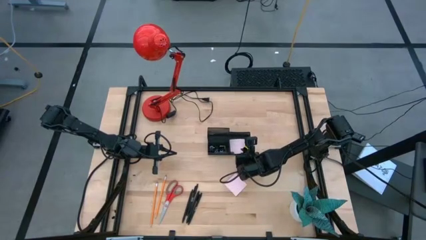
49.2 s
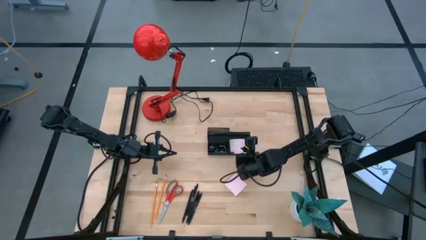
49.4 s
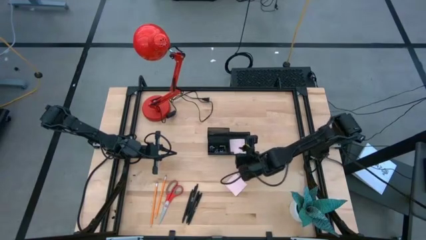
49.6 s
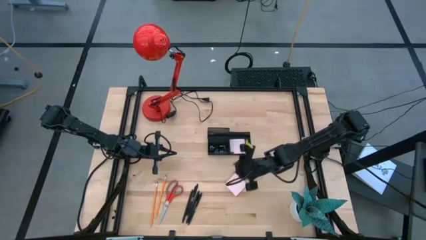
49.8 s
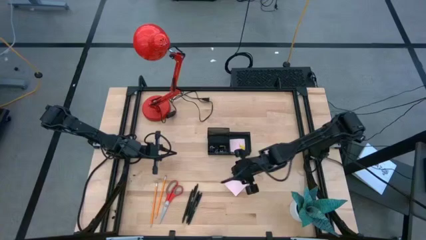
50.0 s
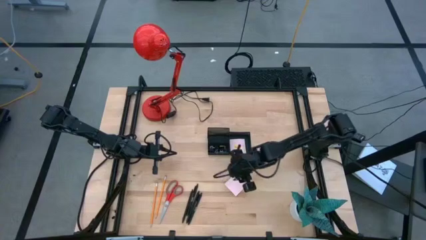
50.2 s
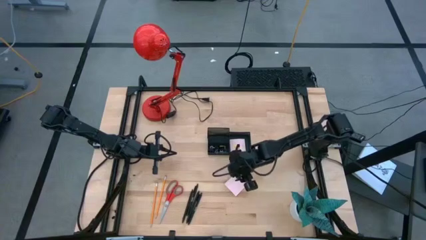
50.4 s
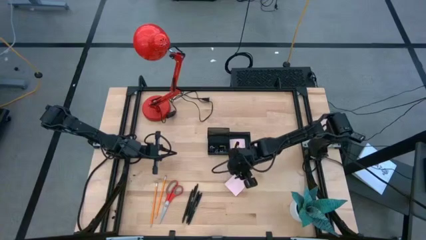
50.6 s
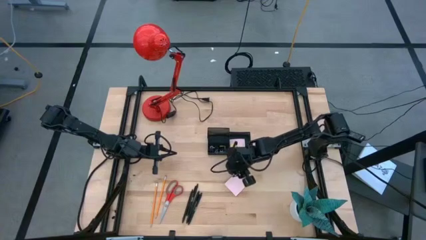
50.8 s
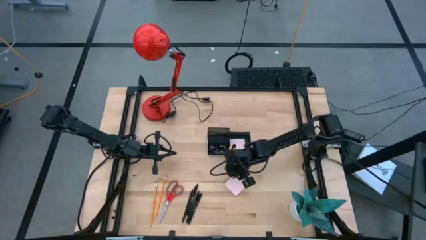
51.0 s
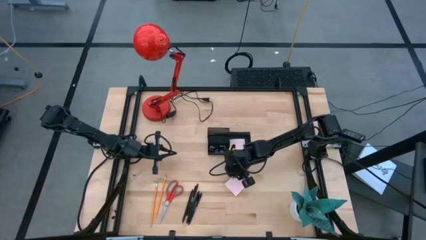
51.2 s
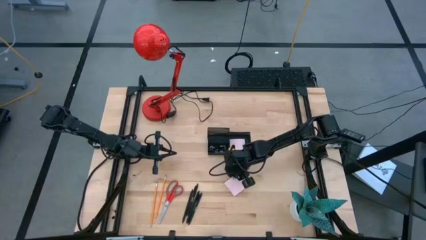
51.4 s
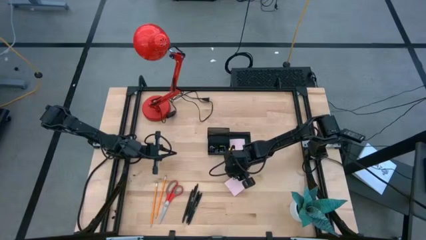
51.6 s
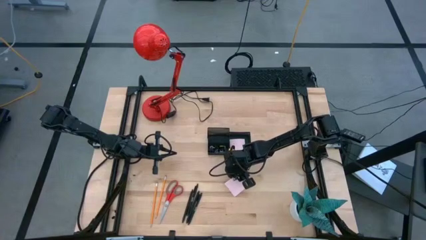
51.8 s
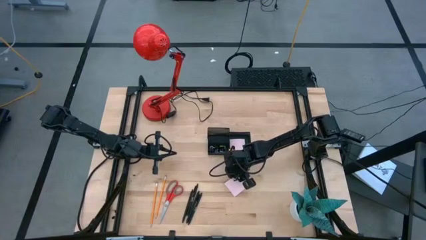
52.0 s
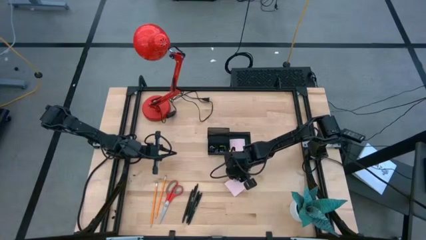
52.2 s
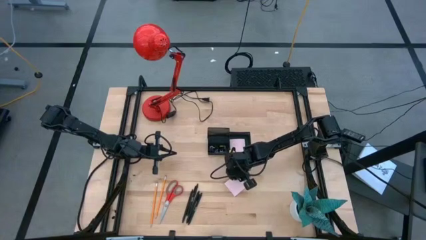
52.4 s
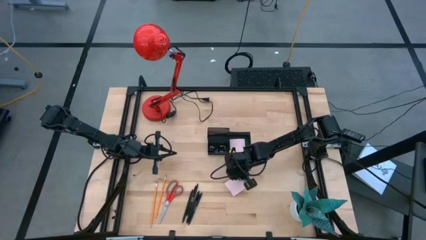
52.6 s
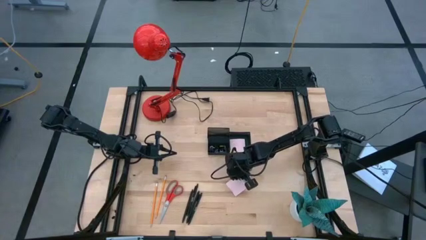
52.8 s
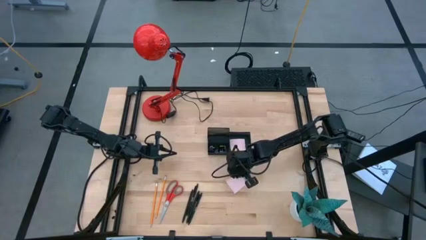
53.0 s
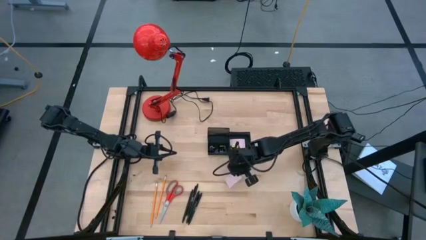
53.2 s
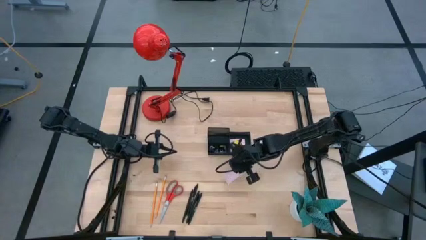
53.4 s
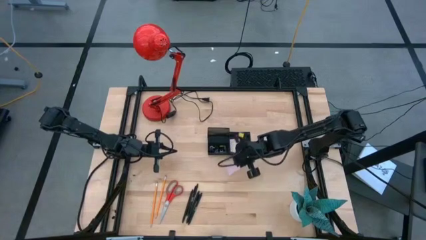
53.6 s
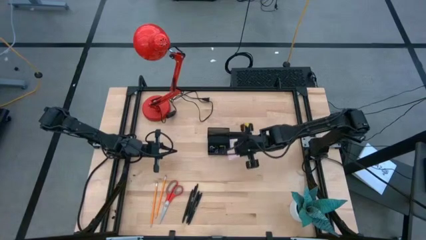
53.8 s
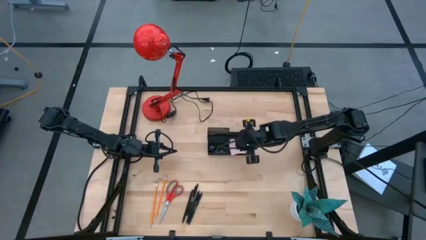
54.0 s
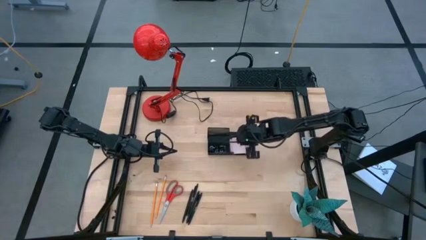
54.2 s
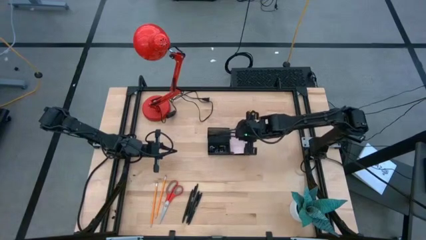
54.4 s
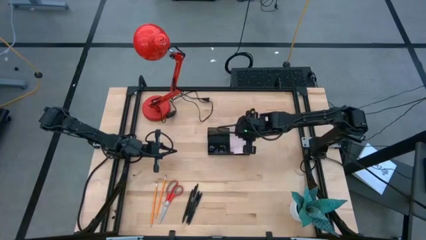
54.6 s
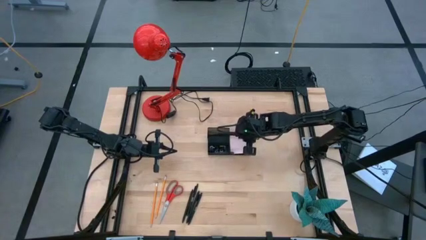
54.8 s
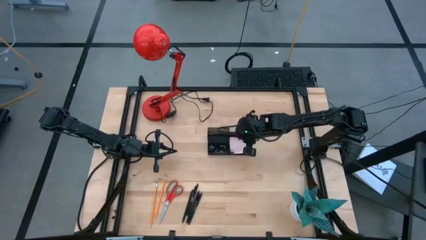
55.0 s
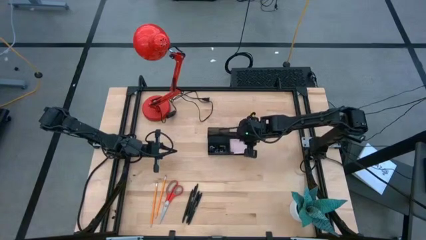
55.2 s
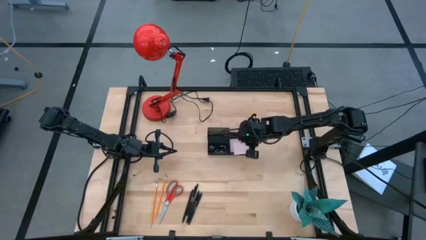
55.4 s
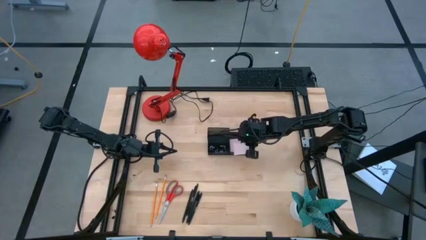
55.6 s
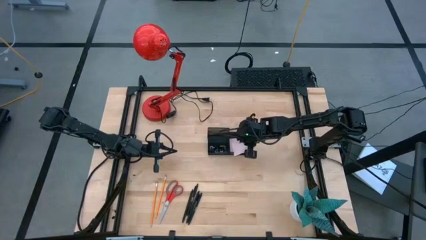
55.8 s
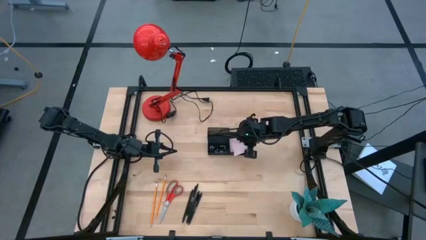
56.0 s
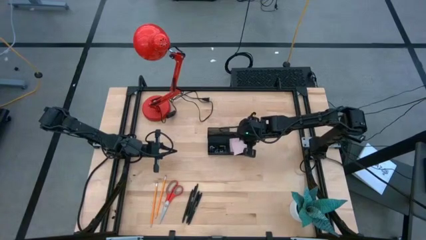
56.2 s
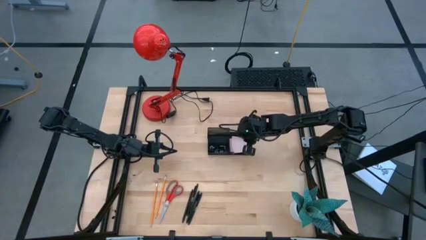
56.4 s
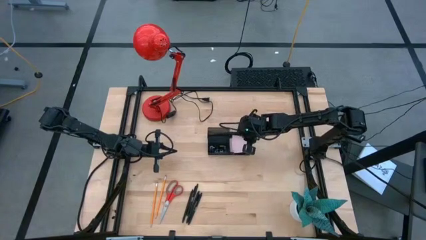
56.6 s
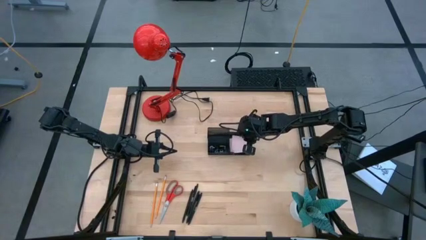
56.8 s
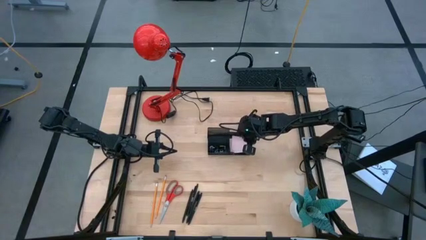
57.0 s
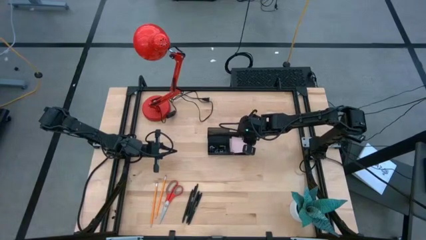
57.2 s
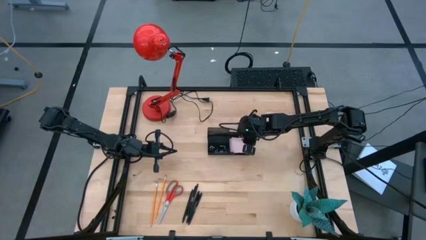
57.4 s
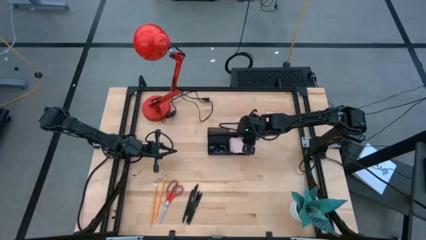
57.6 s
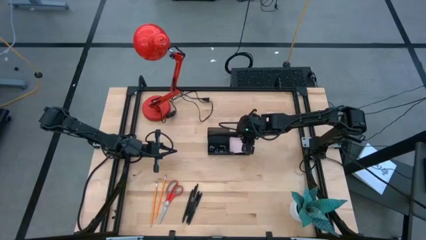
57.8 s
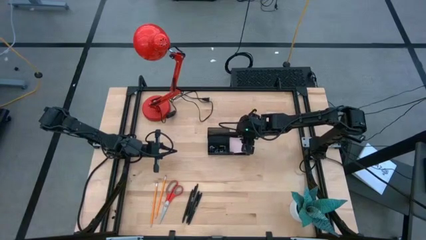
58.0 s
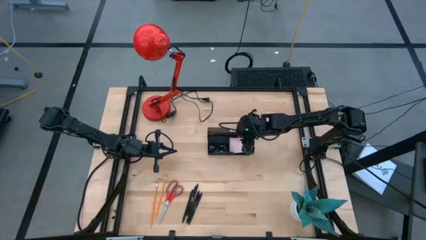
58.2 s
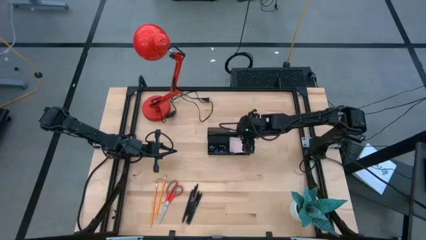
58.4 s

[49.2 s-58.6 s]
Task: Pick and place office supplies into organizer
Put the pink sticky notes into the black desk organizer

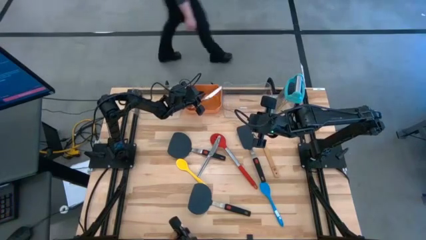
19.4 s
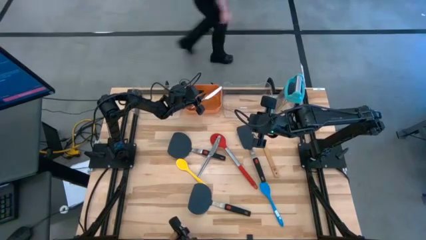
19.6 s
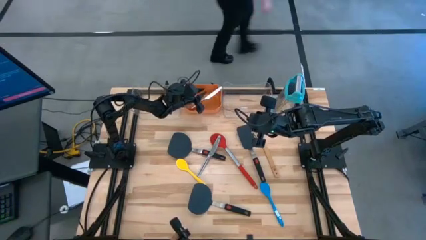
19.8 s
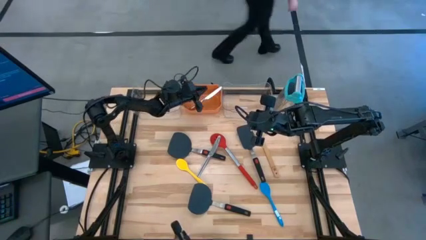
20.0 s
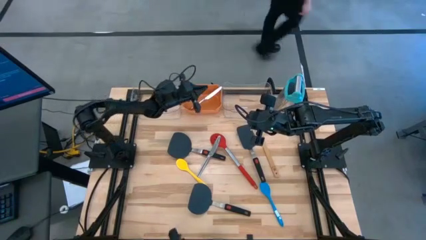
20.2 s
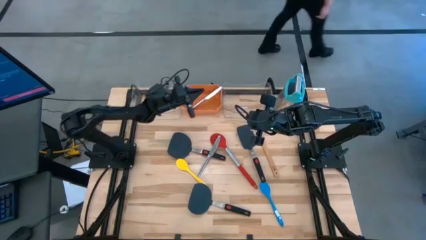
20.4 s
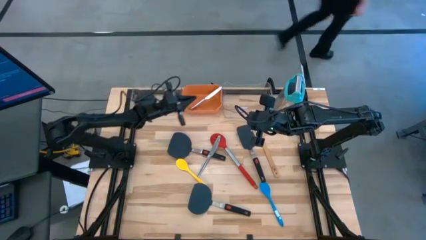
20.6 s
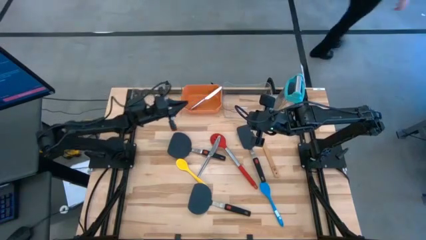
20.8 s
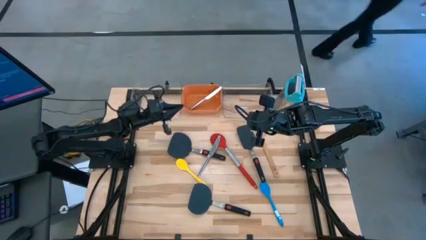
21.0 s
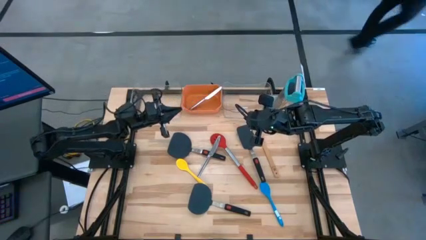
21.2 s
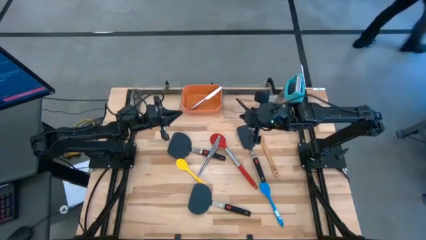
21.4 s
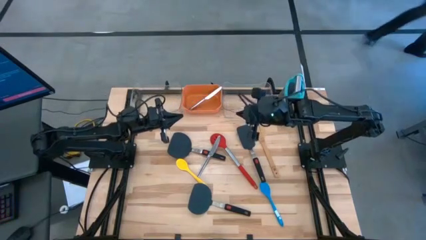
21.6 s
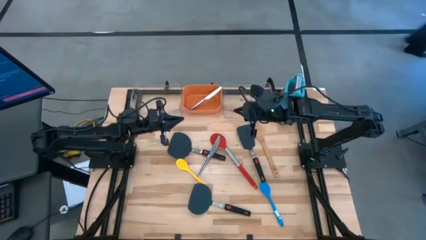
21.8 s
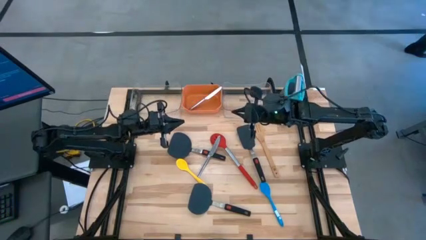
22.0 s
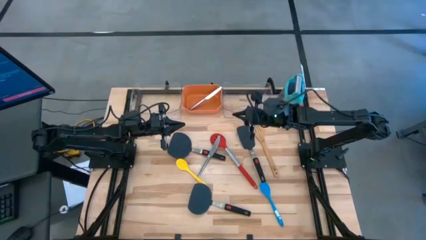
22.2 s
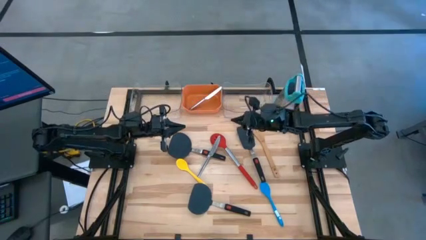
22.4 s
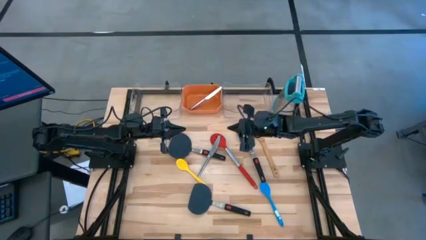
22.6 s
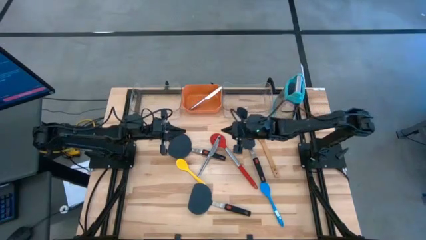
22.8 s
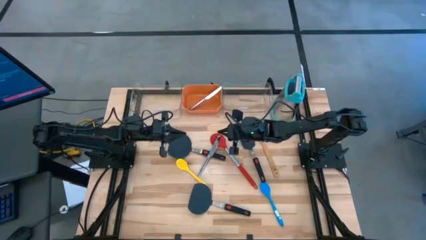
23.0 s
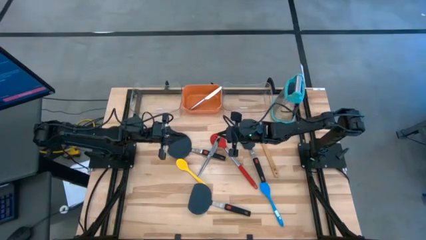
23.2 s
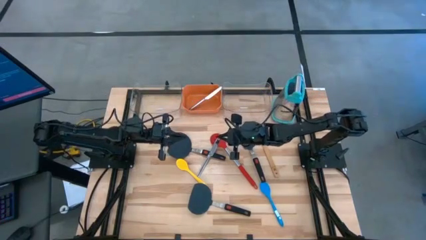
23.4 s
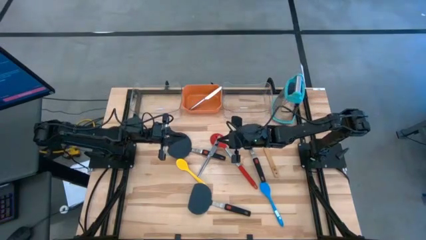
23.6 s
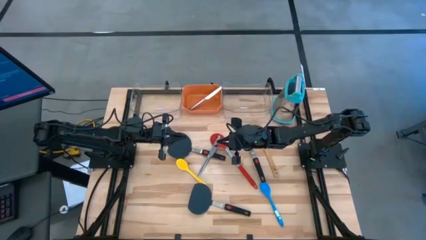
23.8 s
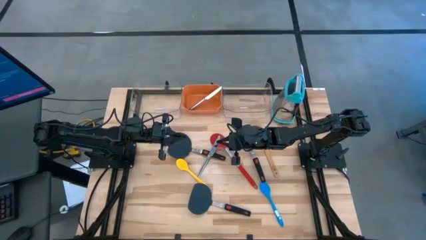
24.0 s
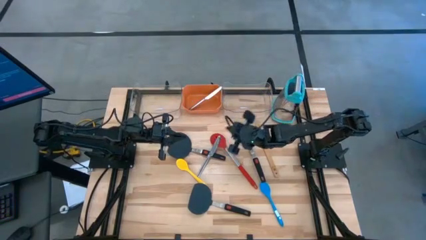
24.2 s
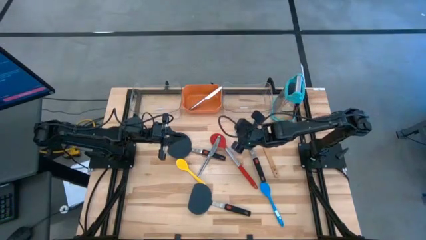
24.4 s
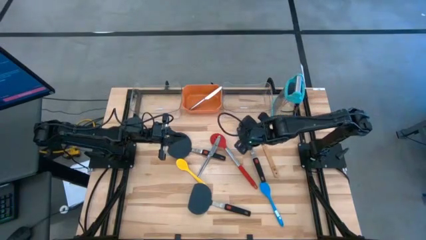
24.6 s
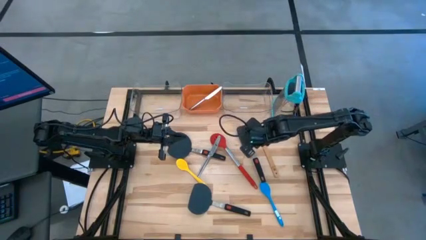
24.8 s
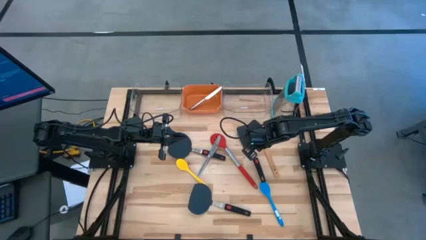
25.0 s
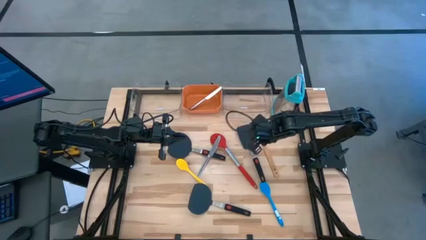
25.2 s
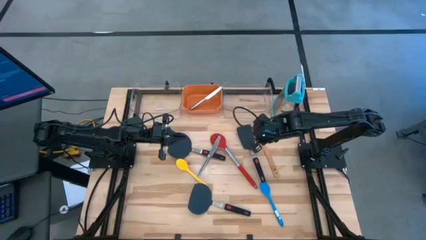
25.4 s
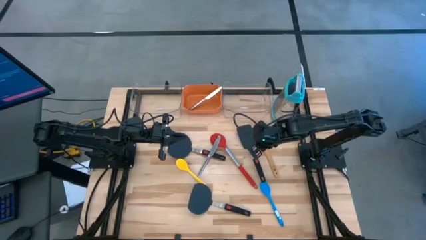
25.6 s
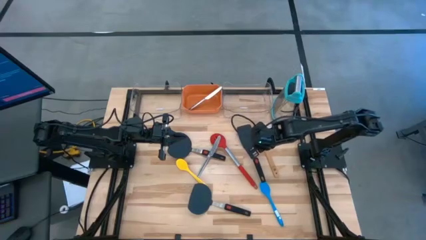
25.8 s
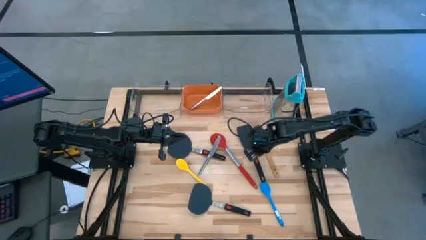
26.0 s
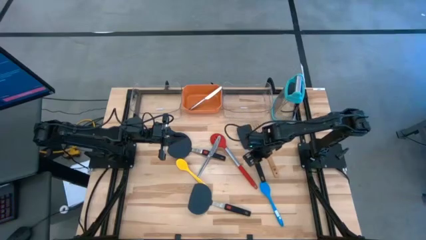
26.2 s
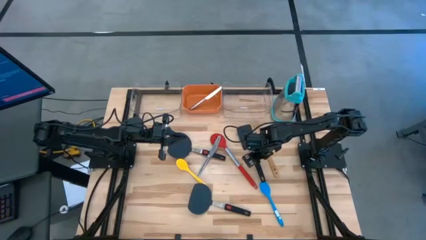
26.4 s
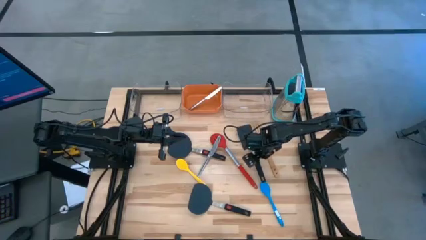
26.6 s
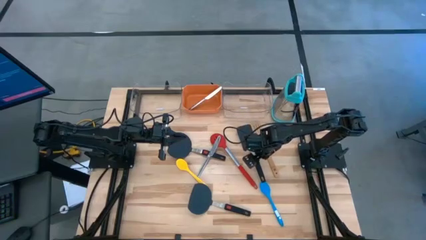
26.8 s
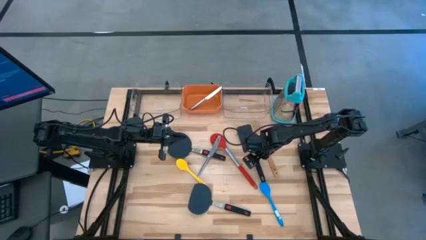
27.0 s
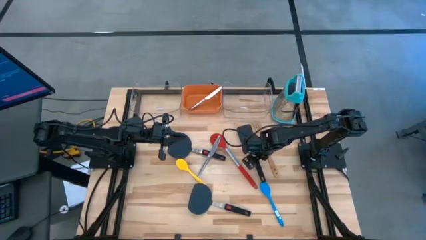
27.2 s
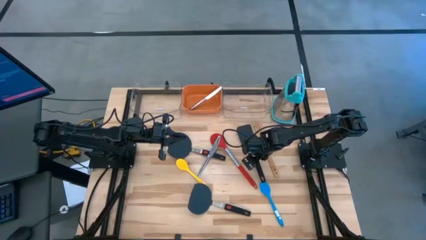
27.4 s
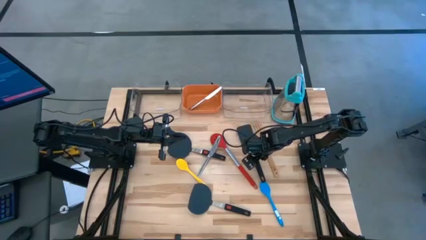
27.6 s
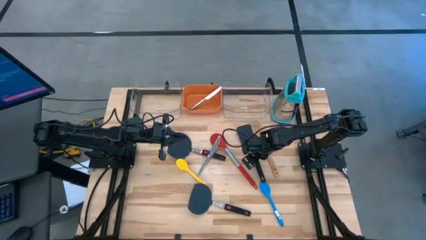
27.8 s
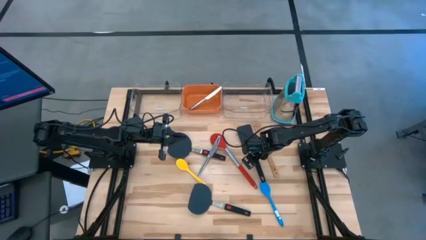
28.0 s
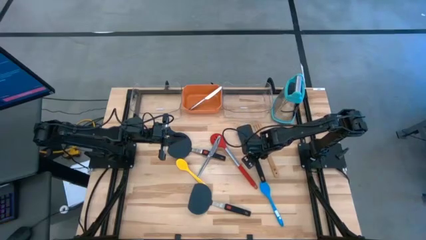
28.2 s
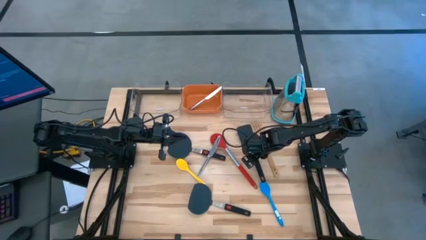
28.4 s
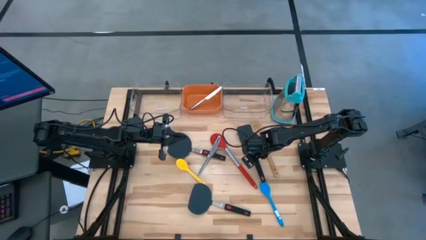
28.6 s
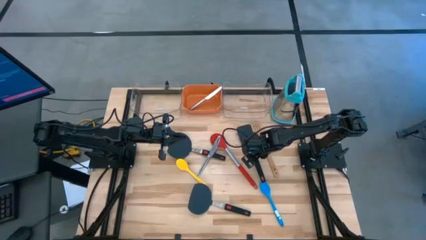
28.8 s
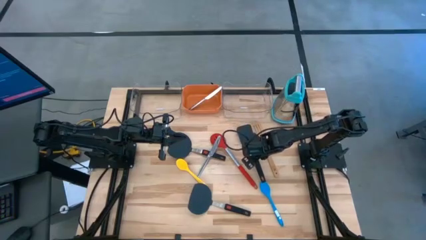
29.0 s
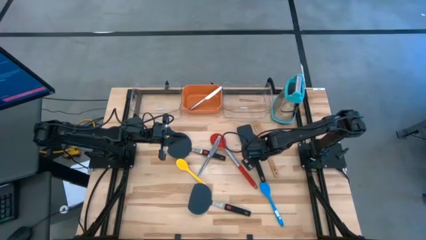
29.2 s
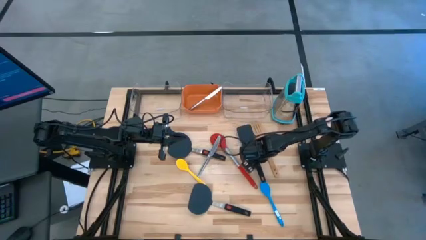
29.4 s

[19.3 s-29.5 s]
Task: Pick & Place Kitchen Items
Put the black spatula into the left transparent bin
